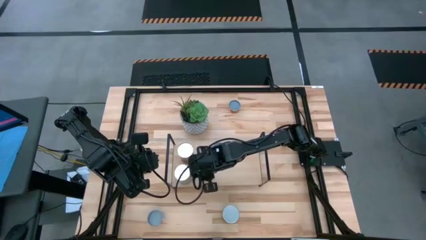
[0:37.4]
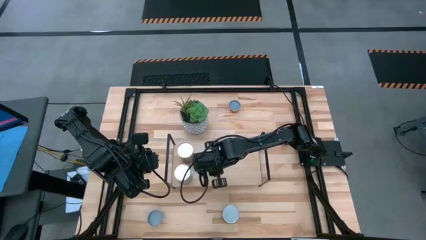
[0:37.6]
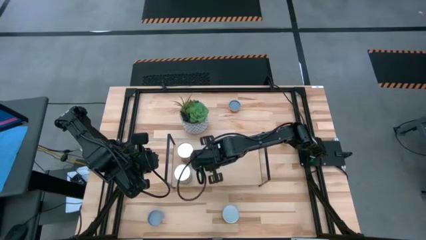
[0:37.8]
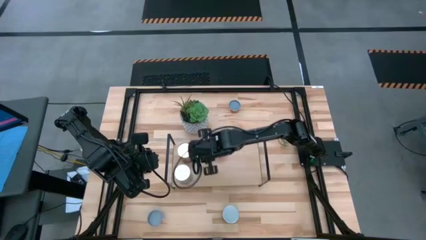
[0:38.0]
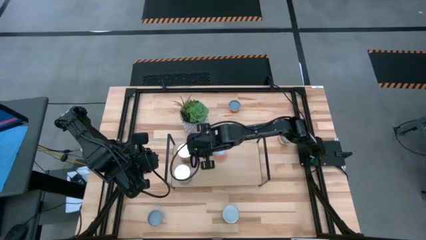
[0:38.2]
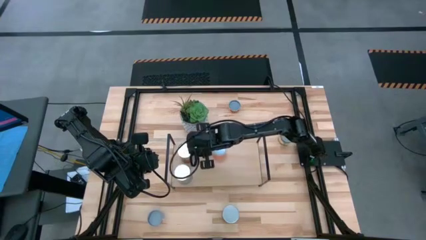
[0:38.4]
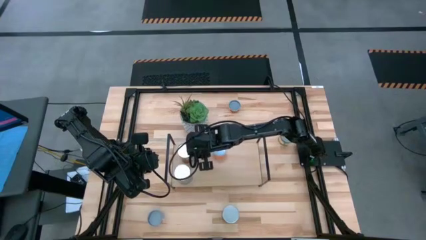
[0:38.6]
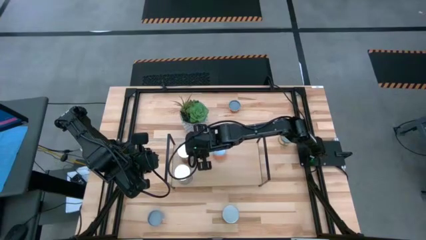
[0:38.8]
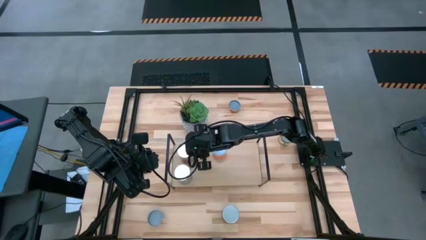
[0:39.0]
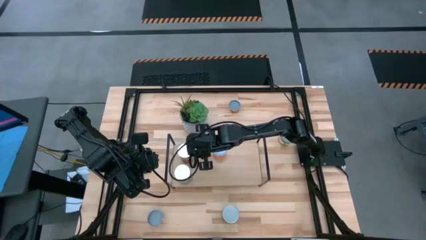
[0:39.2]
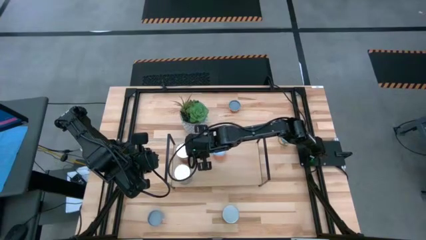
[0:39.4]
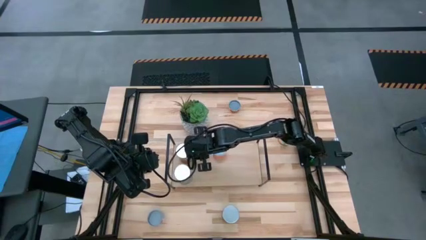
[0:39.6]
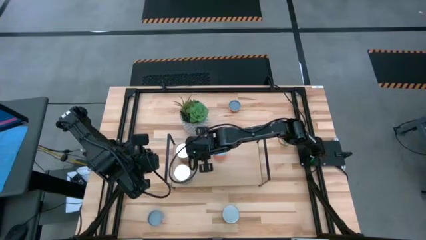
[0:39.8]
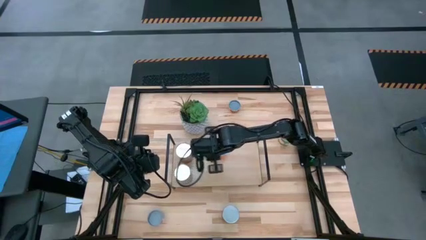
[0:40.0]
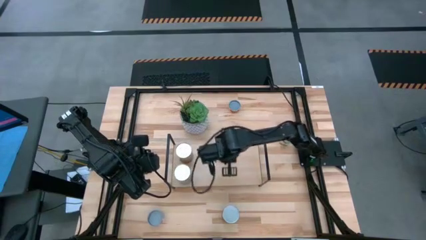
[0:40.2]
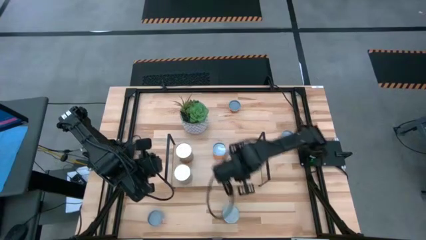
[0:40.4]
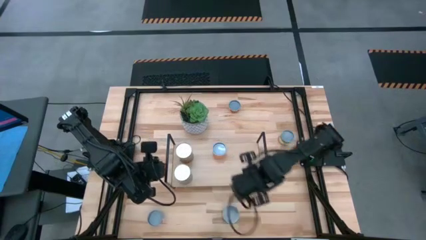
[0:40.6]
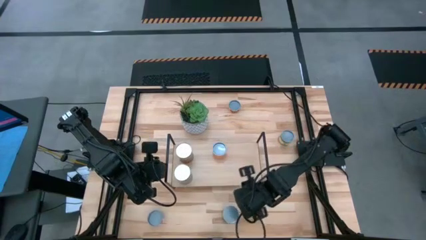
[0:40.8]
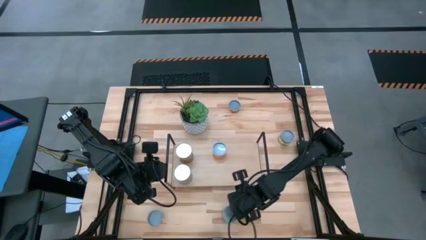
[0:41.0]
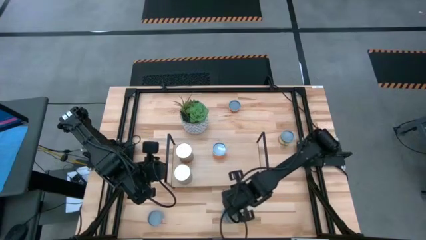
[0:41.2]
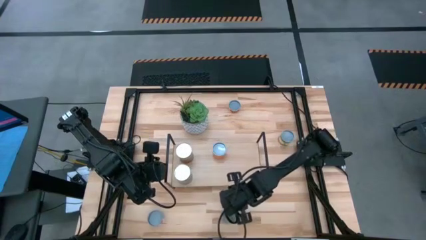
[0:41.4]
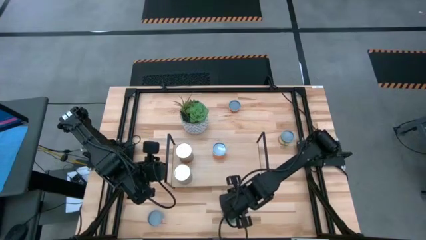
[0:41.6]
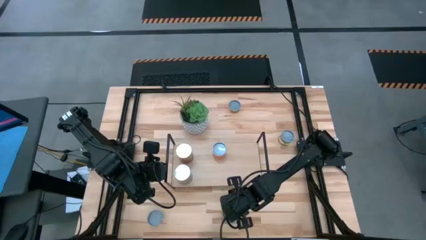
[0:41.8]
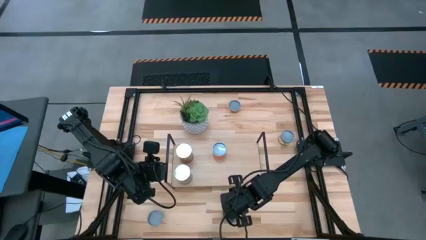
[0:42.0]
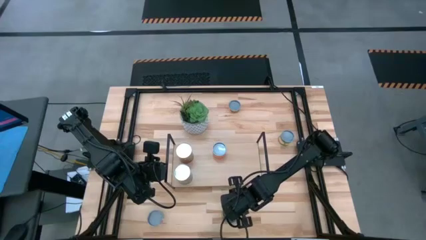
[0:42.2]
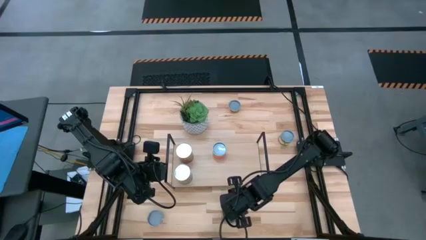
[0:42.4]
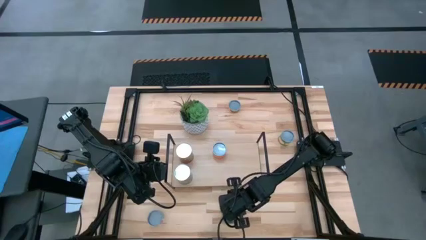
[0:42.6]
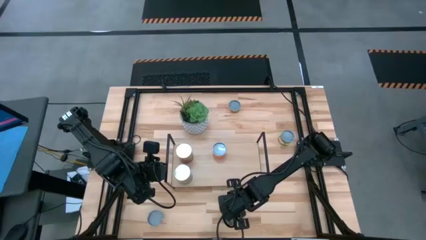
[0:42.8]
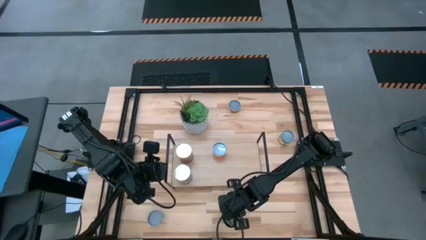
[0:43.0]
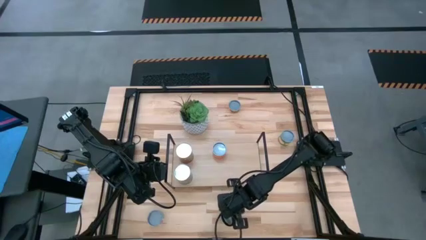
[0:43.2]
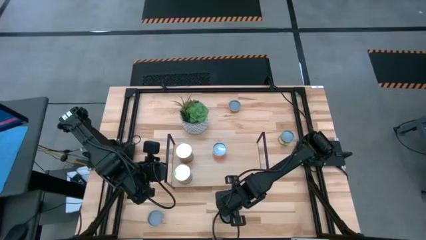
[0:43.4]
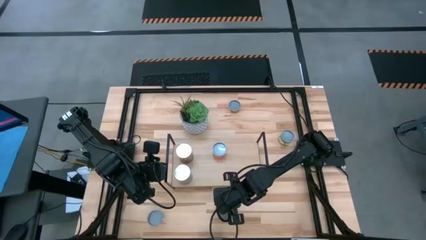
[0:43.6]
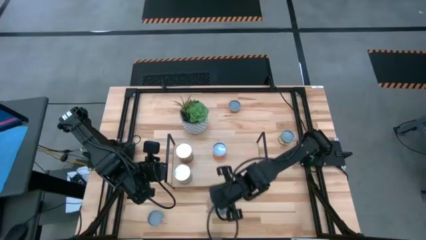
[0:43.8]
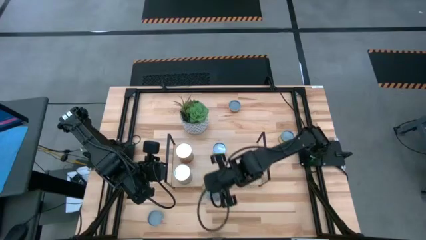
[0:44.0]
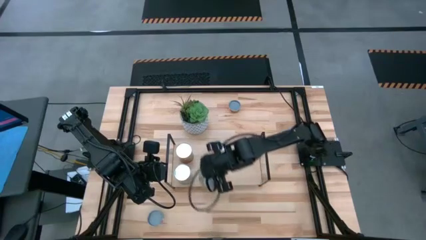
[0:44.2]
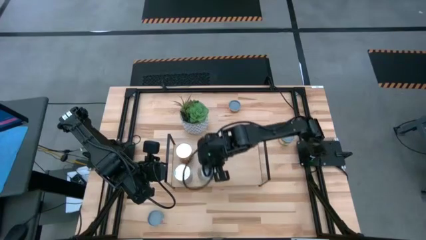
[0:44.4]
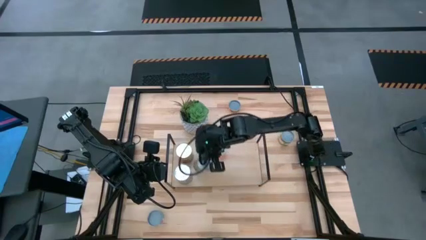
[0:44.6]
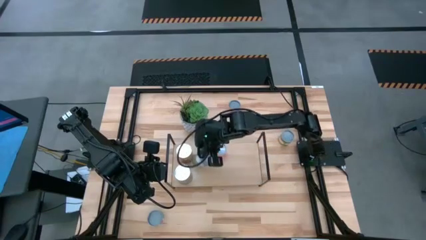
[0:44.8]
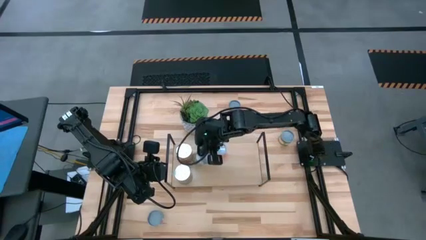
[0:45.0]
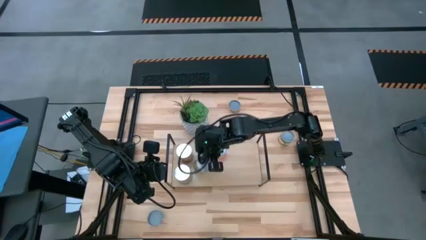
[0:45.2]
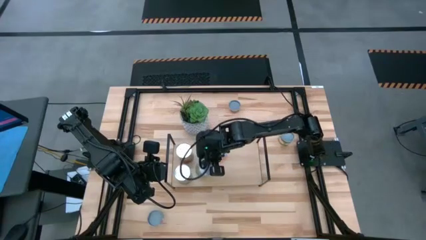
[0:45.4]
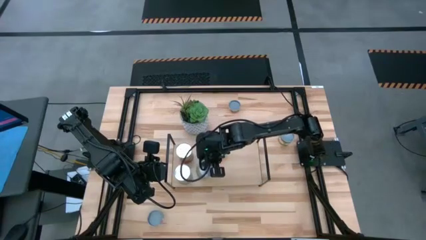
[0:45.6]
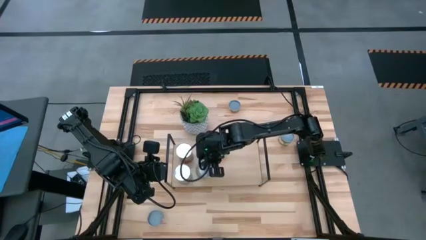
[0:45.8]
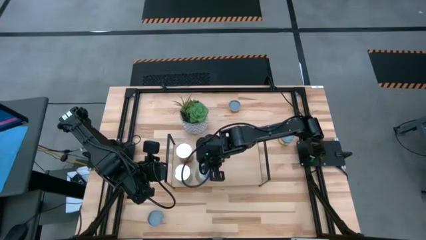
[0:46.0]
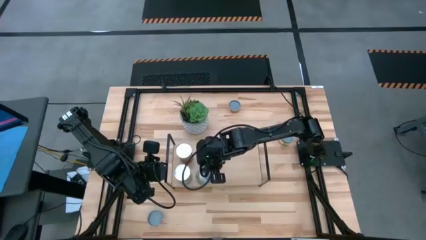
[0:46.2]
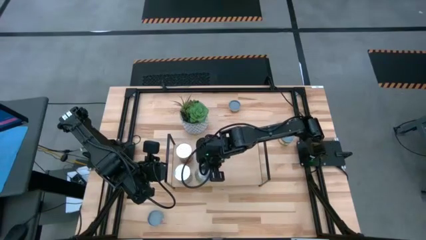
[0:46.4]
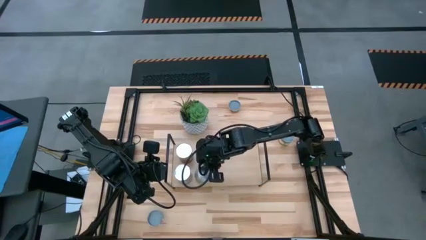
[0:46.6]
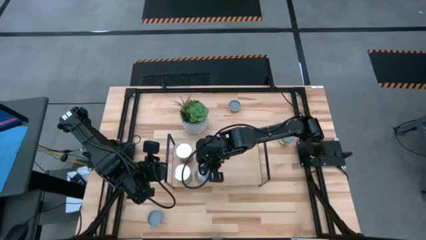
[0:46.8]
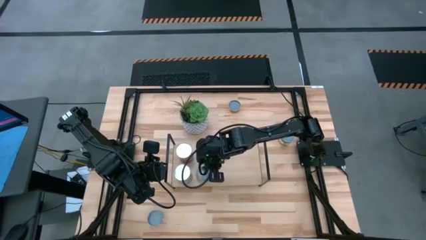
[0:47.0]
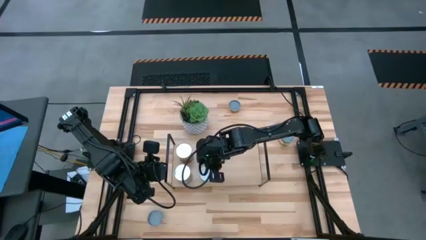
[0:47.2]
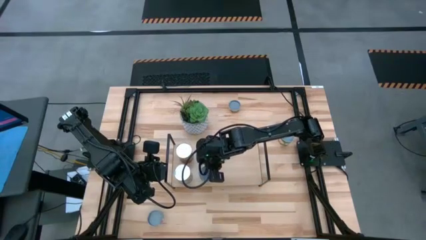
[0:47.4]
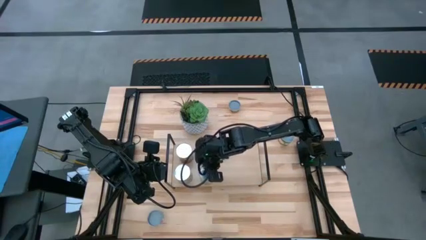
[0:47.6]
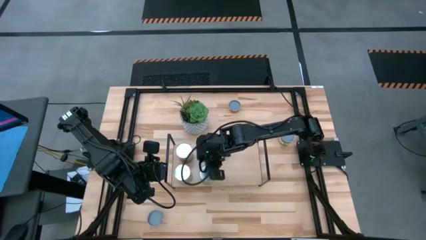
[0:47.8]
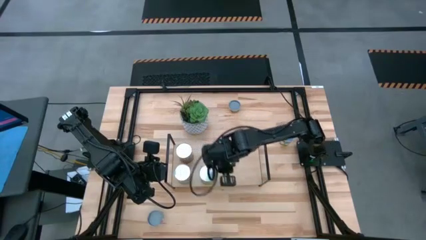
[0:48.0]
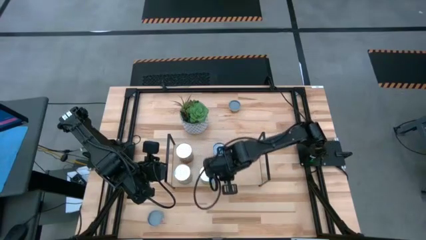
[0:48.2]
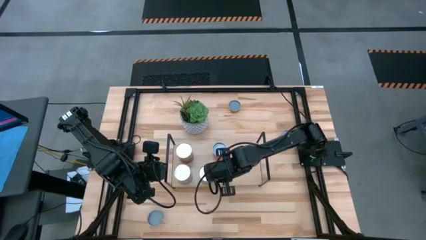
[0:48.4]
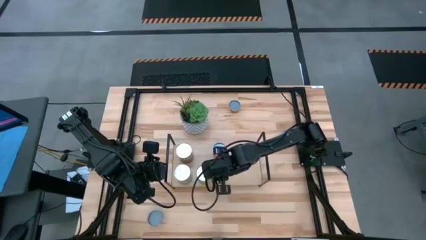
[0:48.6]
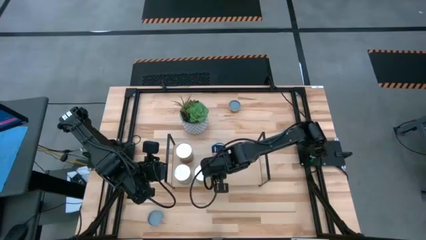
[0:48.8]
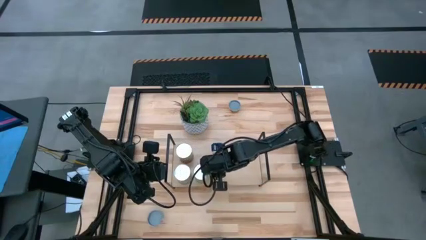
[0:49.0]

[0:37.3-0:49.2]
Task: Pick and place cans onto a shelf
Put the canned pears on the shelf

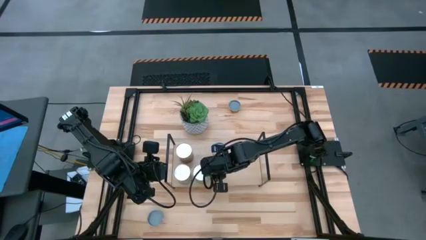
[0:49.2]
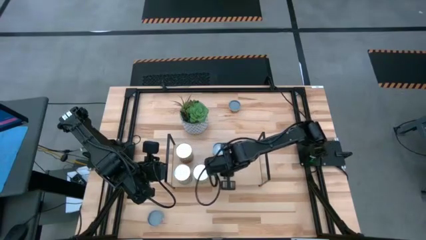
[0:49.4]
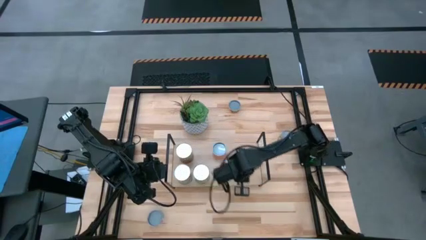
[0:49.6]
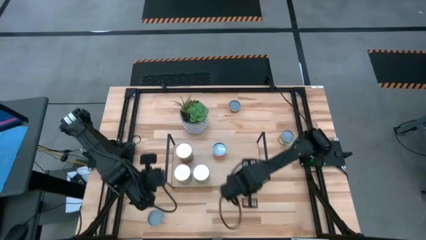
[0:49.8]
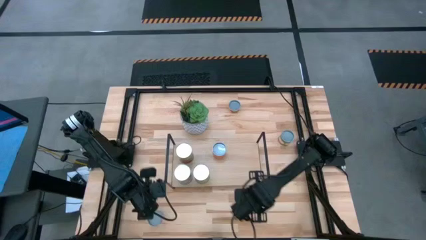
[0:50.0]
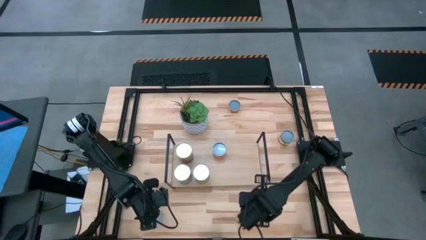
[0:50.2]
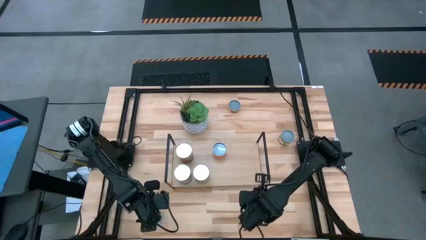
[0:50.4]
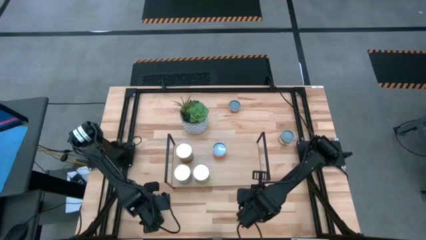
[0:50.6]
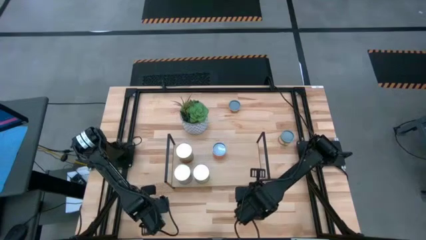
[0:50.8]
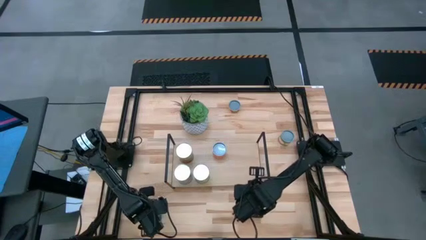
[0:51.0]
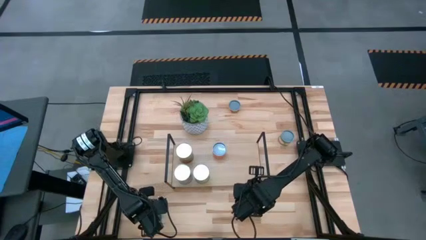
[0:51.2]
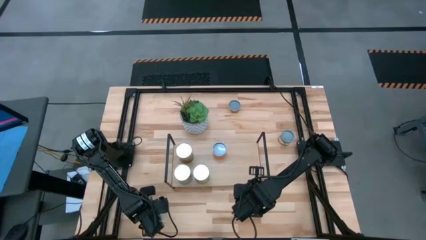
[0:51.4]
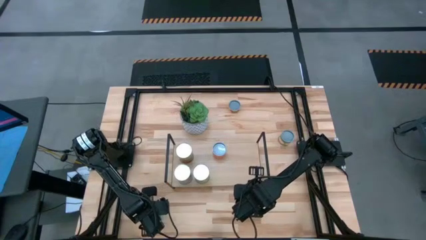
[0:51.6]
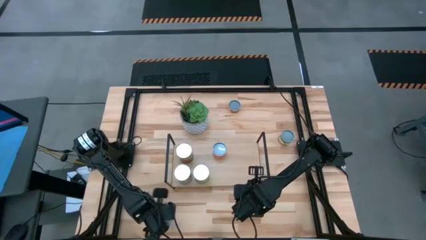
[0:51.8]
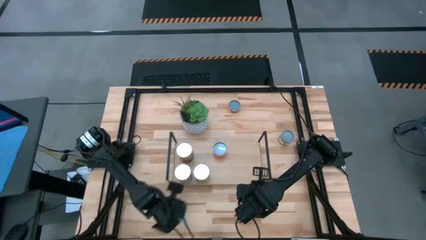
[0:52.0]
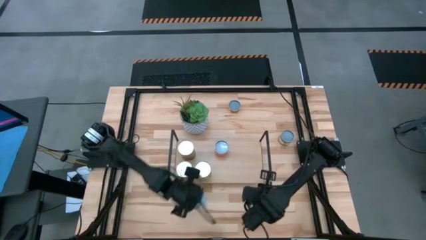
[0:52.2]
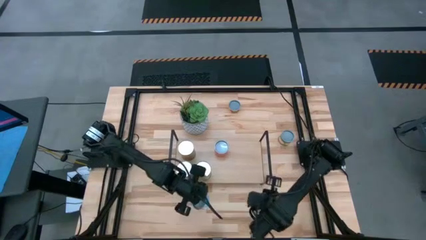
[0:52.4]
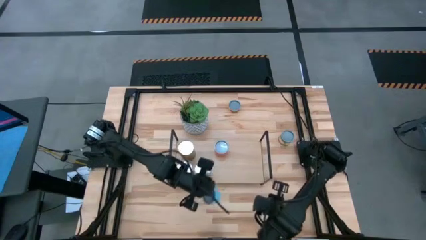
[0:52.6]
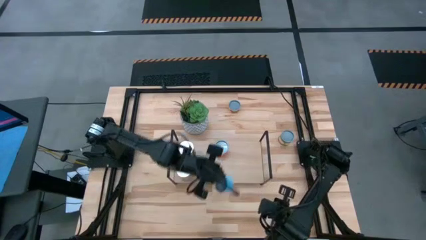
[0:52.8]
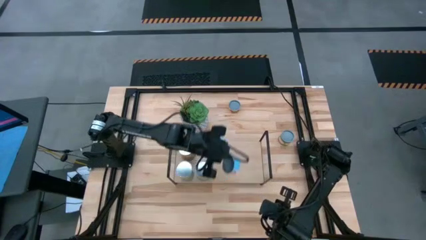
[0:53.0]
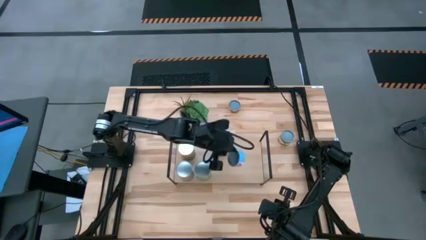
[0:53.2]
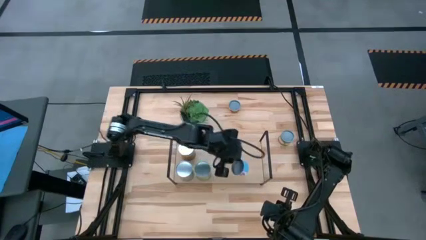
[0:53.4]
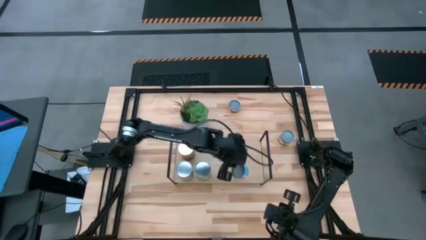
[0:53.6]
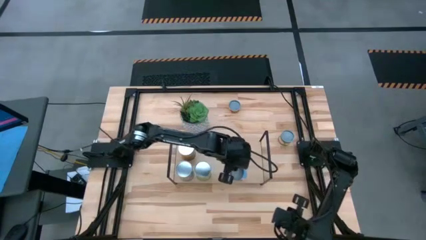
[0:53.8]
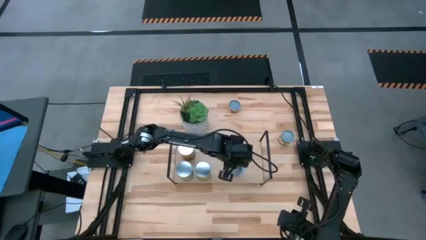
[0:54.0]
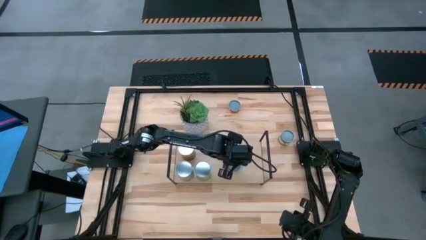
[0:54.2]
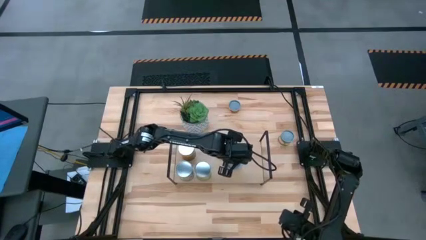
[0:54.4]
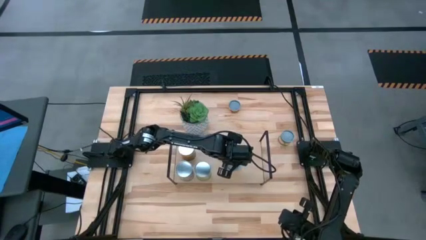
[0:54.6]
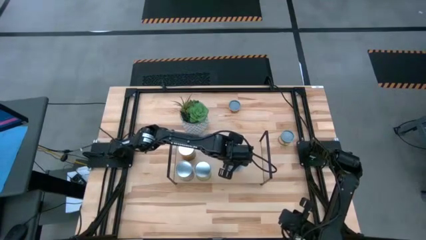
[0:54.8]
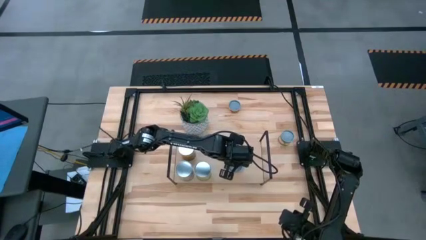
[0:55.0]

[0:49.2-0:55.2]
Put the canned salmon on the shelf
